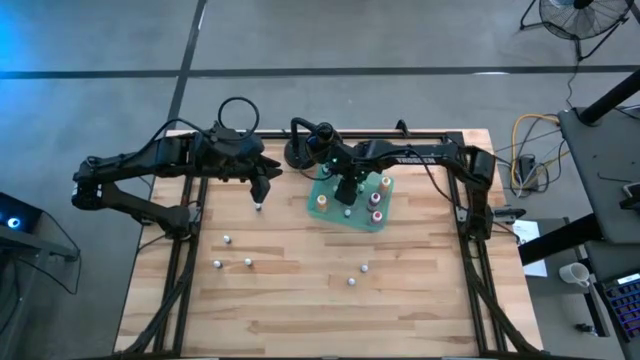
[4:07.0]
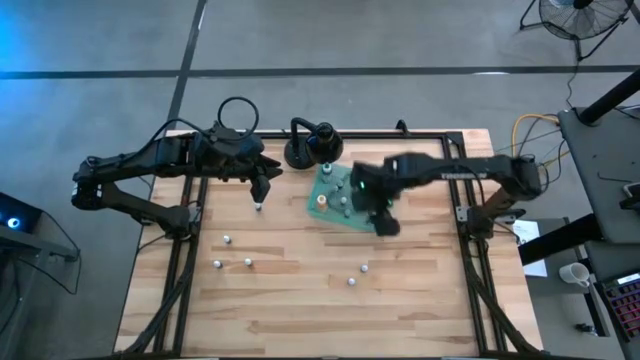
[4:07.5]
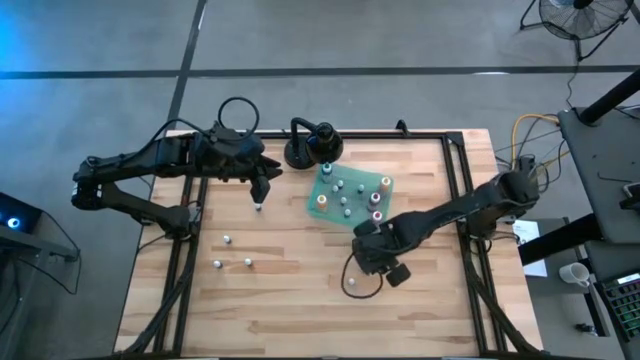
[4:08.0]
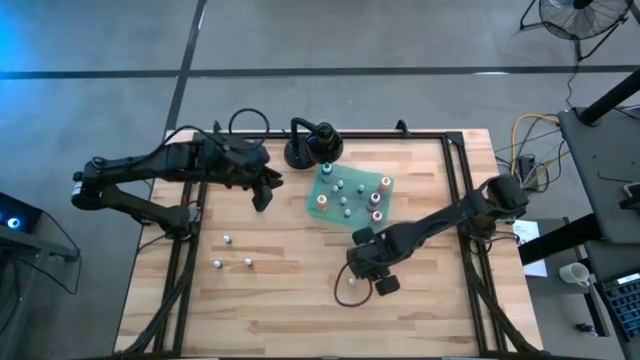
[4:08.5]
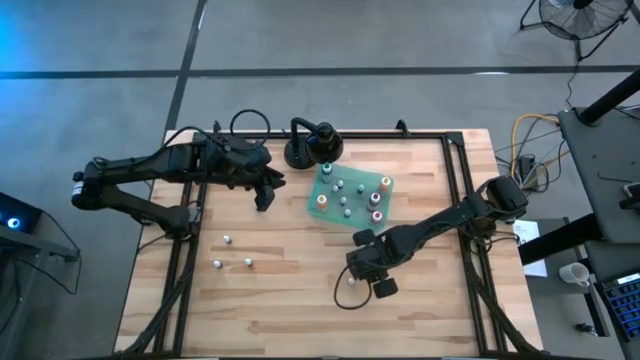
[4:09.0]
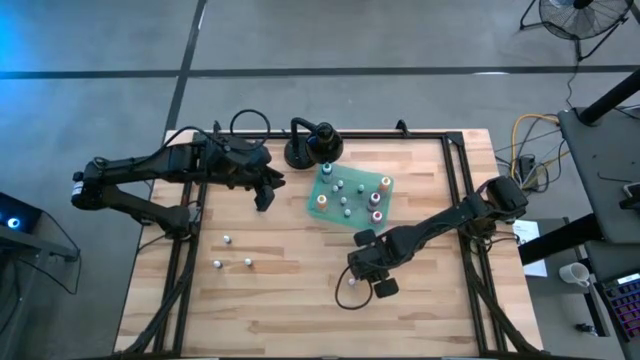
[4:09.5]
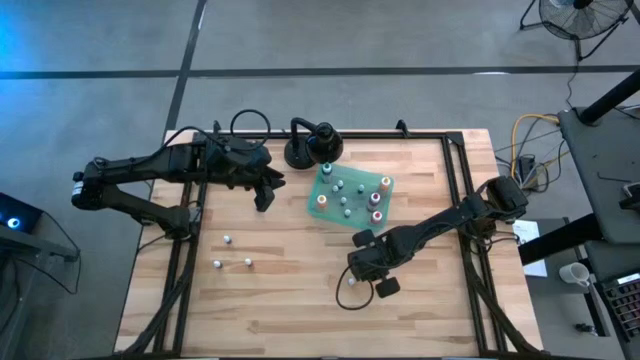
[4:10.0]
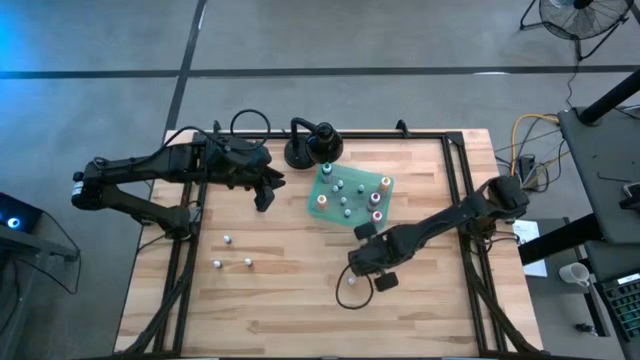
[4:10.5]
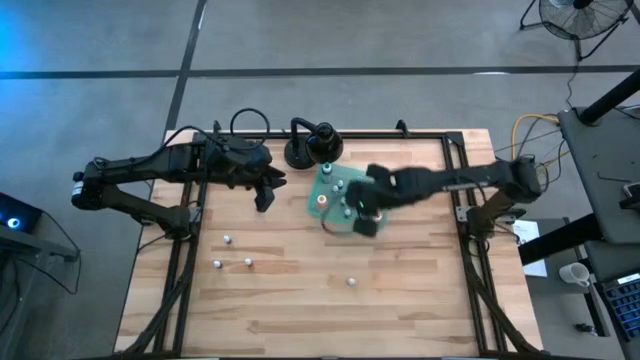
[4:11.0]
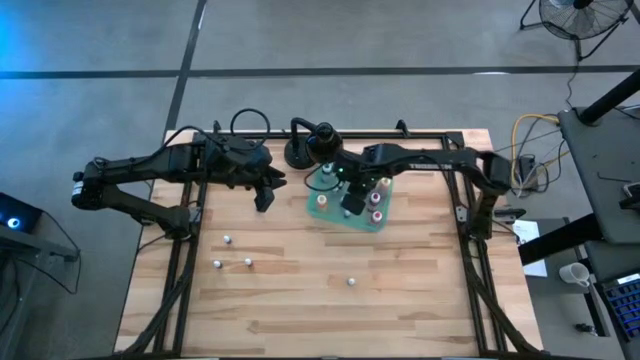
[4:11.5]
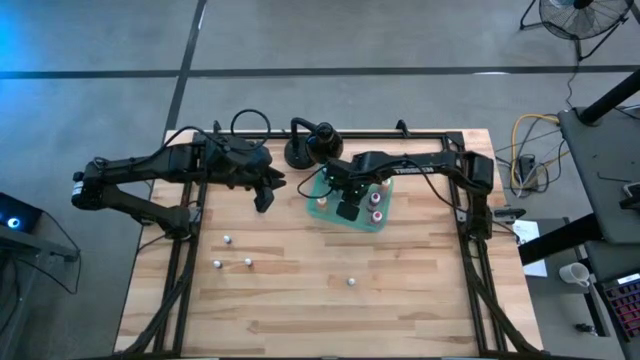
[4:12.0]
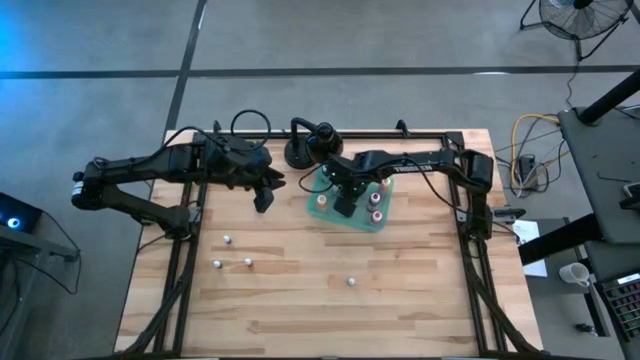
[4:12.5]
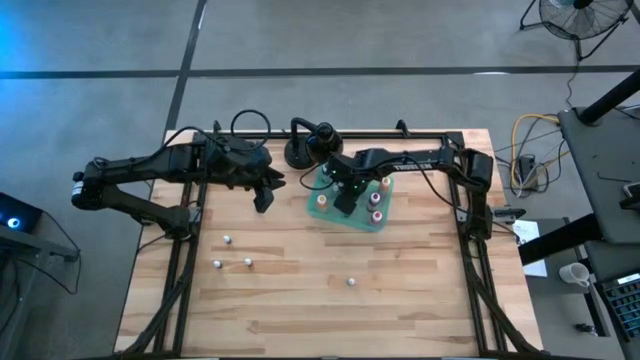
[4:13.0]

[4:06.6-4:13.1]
Task: Pick & Place food coloring
Put the red food coloring bottle into the bin

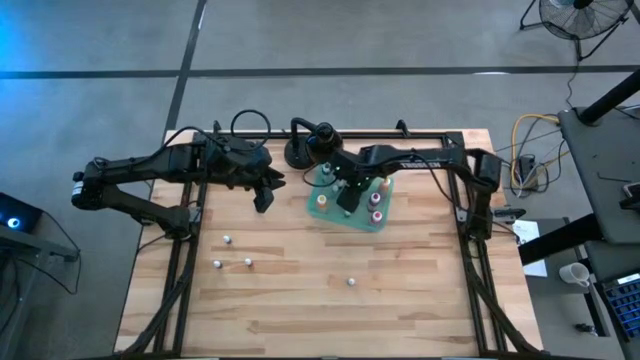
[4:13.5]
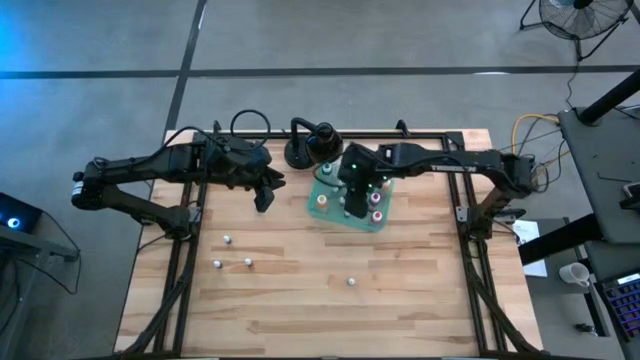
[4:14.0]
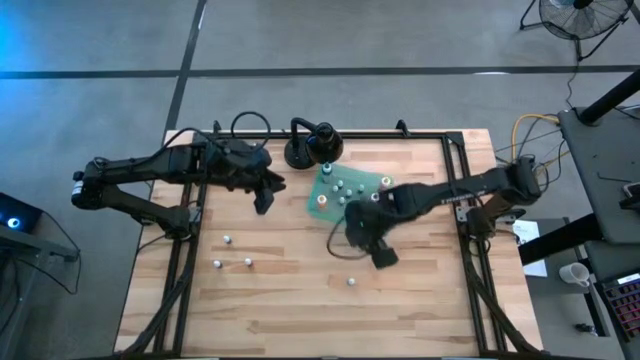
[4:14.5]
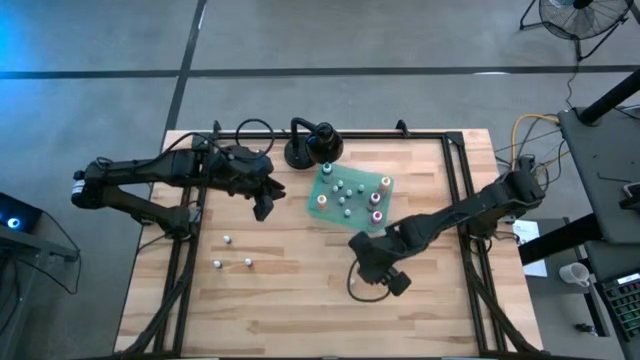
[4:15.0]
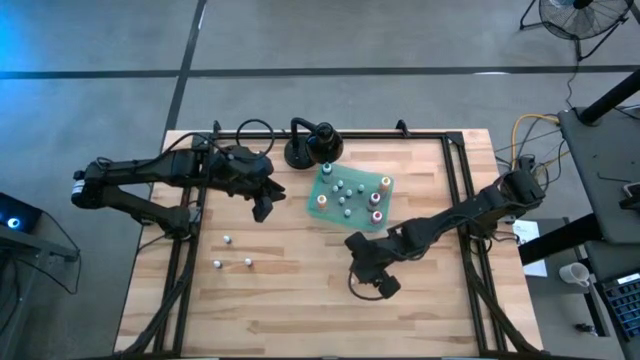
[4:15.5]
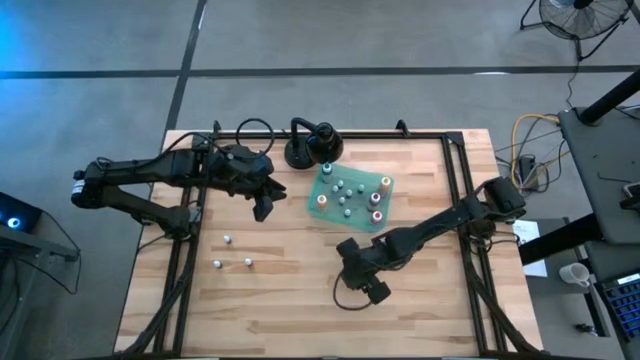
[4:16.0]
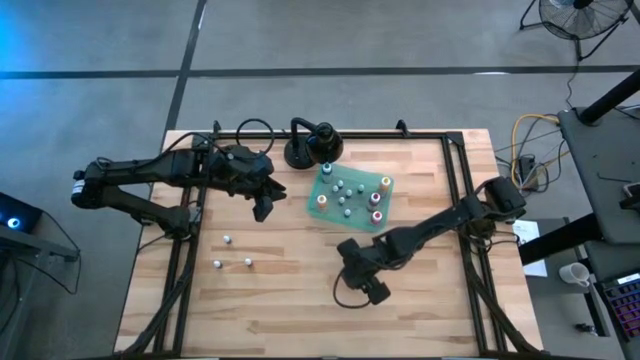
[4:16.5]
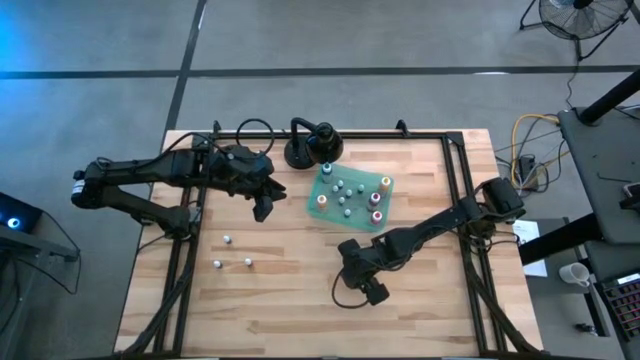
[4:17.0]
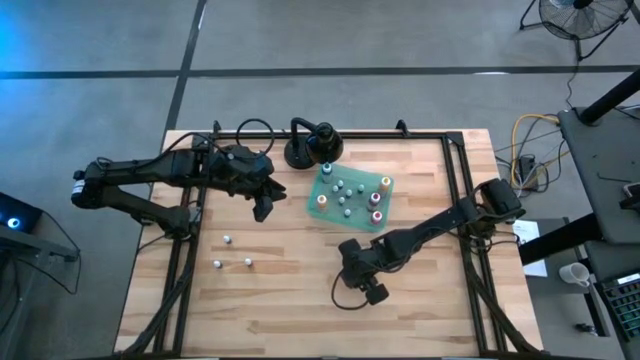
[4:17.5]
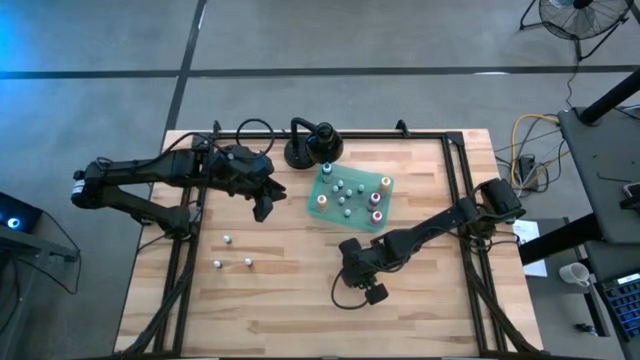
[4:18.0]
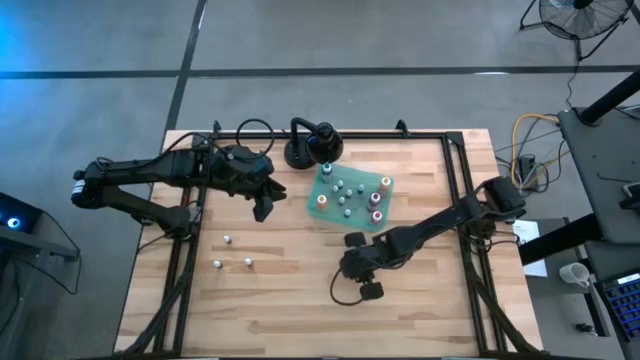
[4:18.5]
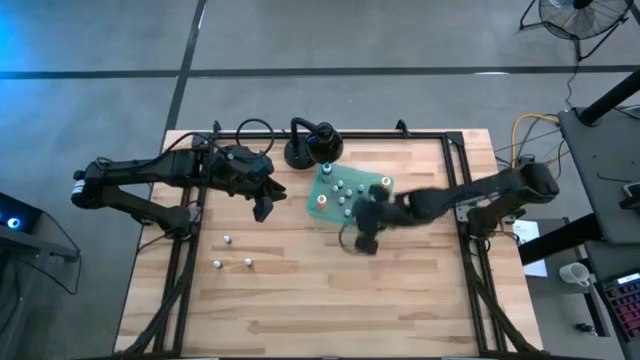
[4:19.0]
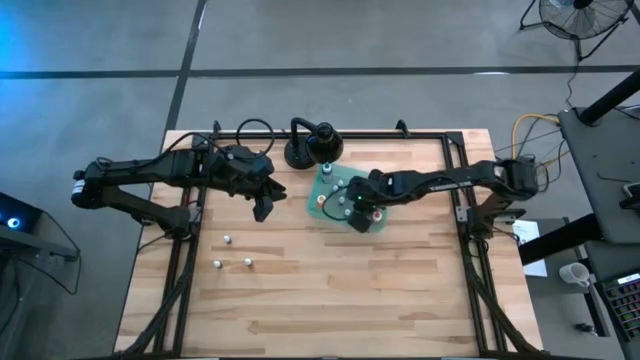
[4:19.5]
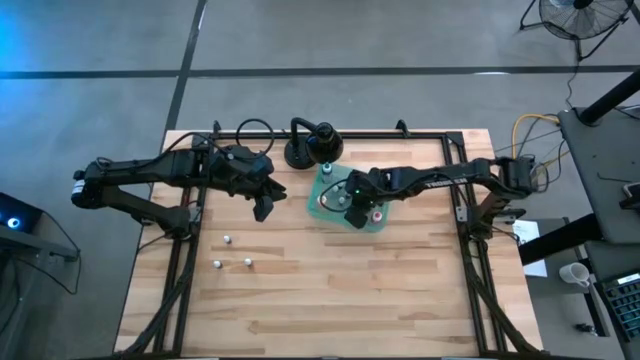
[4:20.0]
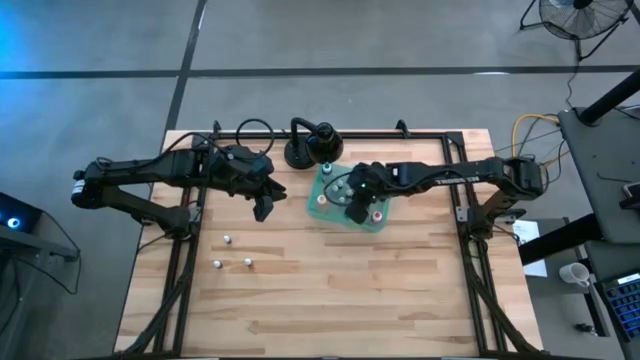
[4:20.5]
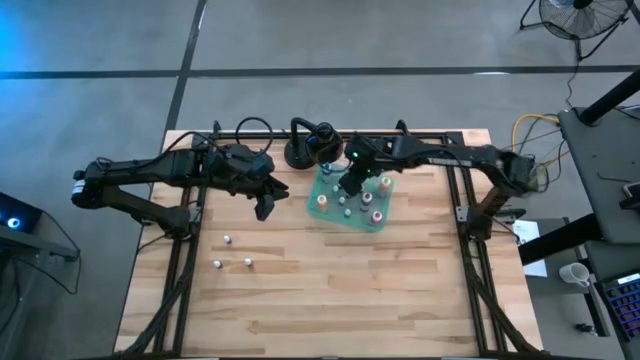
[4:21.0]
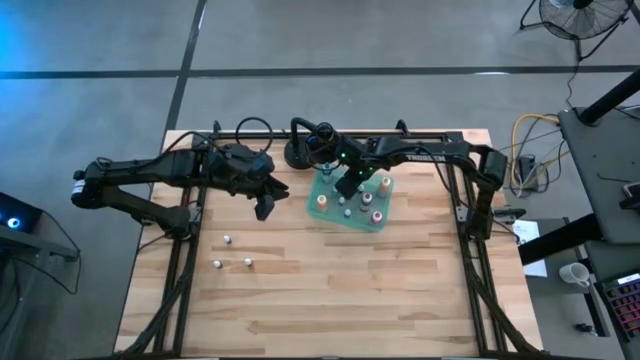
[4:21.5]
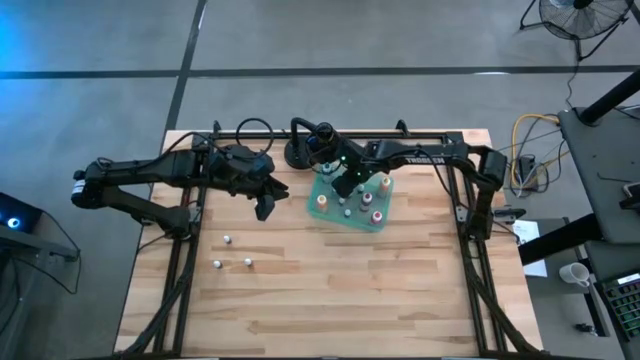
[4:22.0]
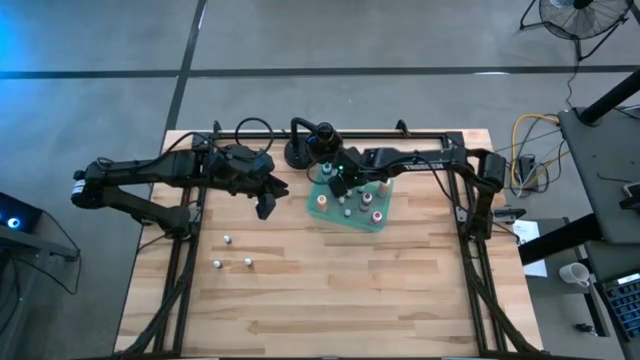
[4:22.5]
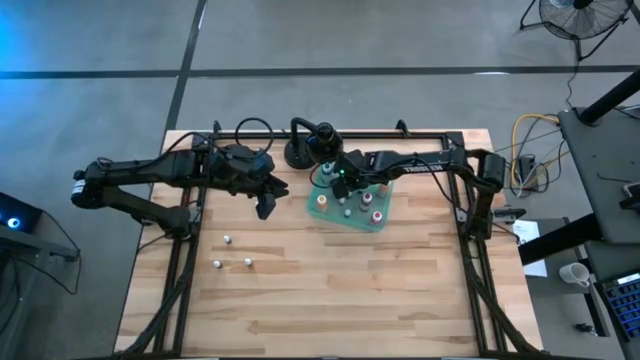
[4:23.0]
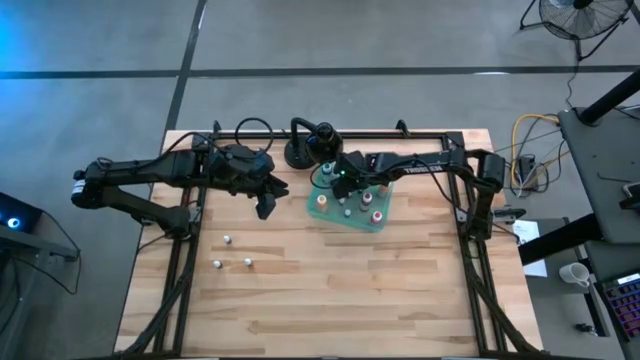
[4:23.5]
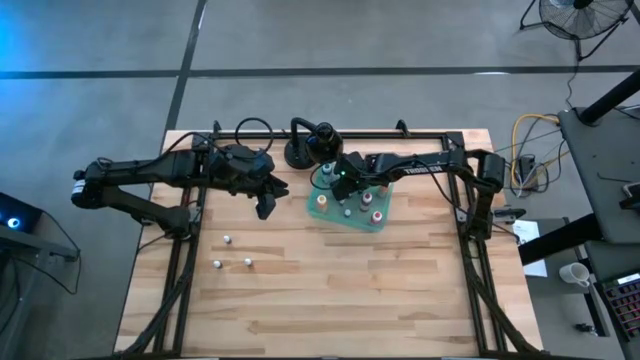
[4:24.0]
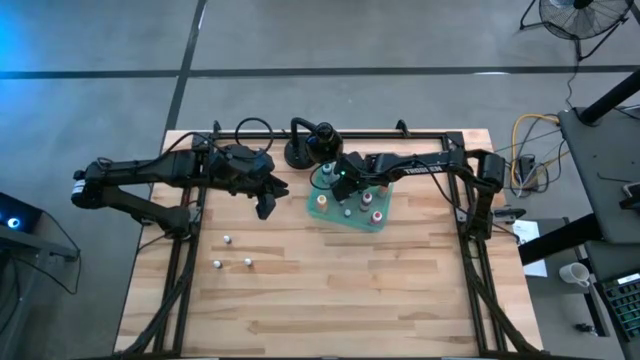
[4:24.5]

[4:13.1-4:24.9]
Put the green food coloring bottle into the bin

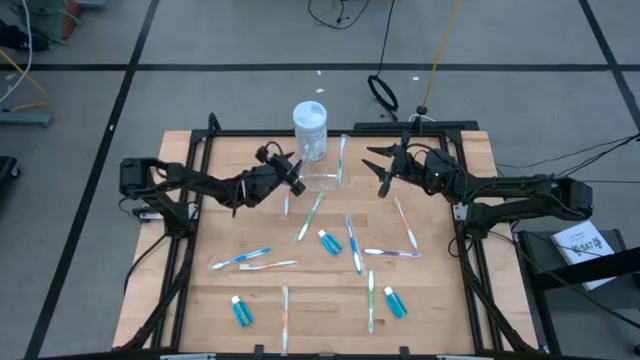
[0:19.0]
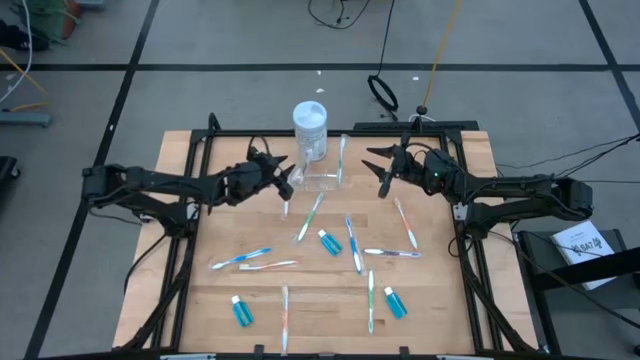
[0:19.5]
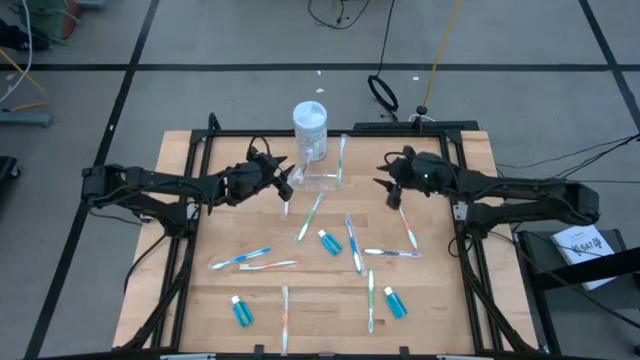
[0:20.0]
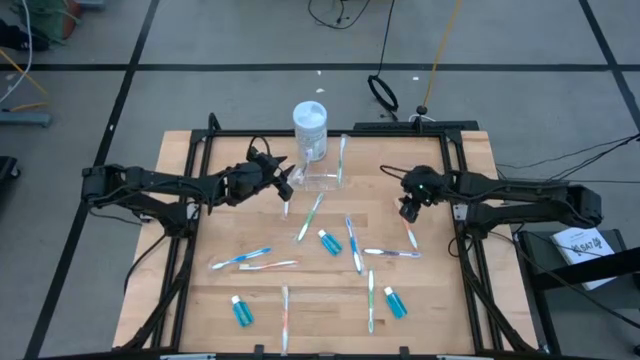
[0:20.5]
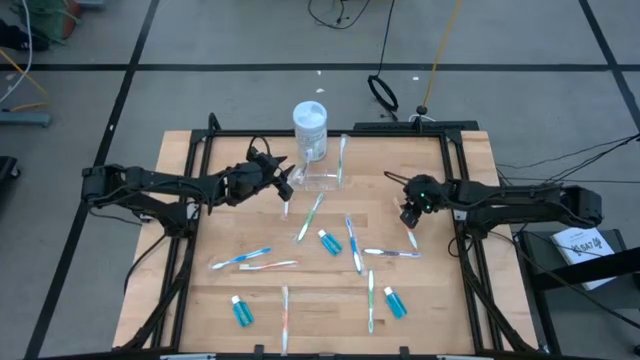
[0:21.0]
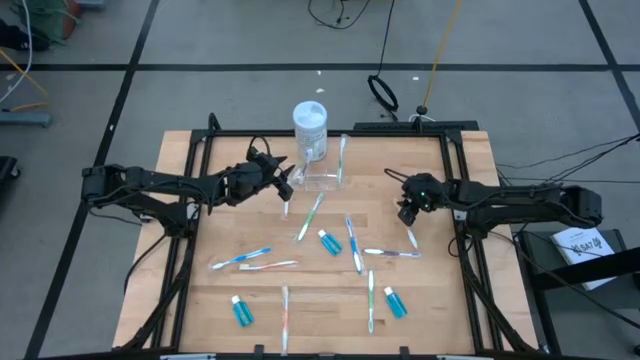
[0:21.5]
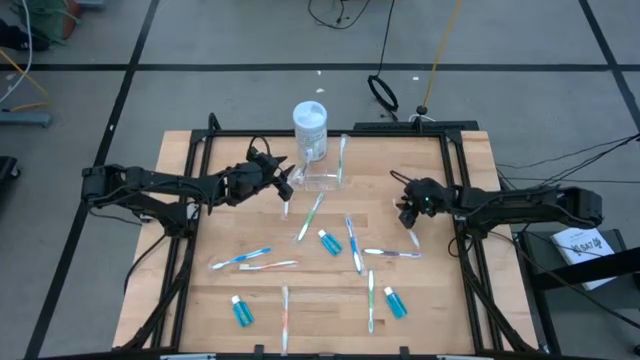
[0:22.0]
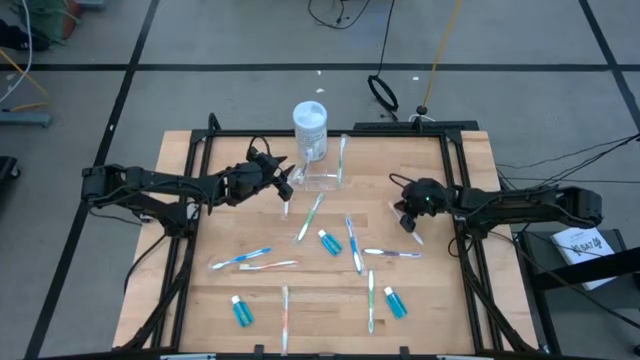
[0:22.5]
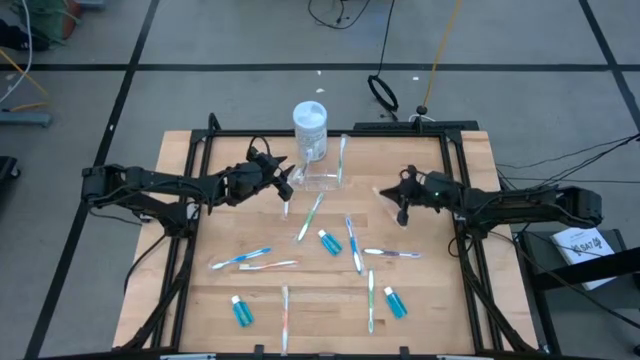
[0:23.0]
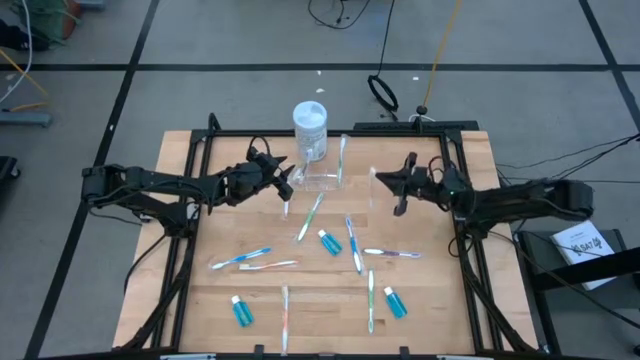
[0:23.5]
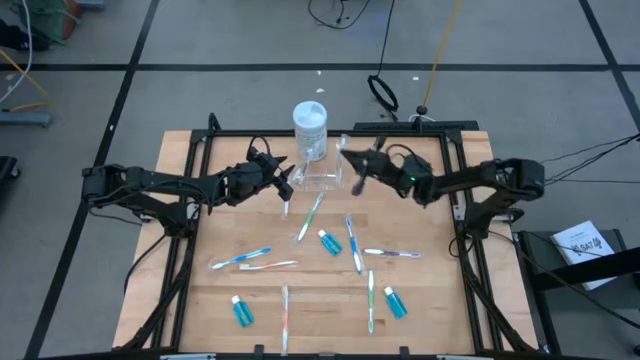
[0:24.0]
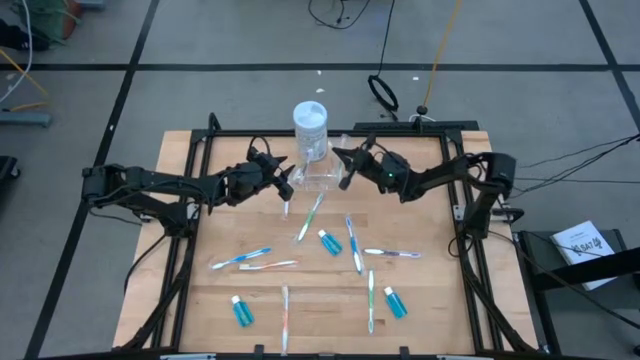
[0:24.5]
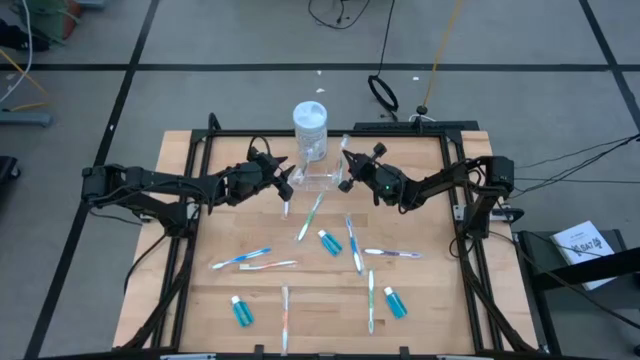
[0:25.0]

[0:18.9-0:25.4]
Task: Pick & Place toothbrushing station
Put the orange toothbrush into the transparent organizer
